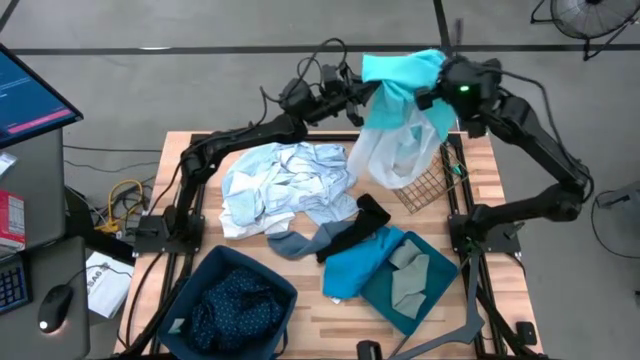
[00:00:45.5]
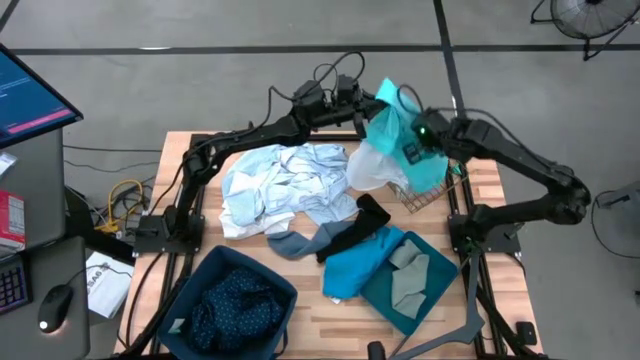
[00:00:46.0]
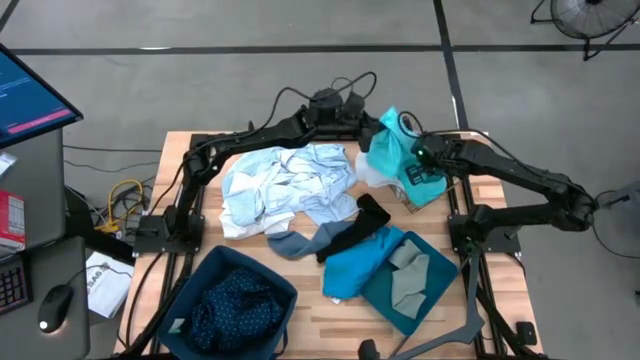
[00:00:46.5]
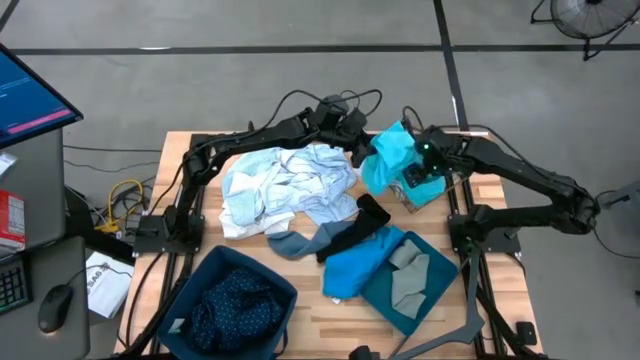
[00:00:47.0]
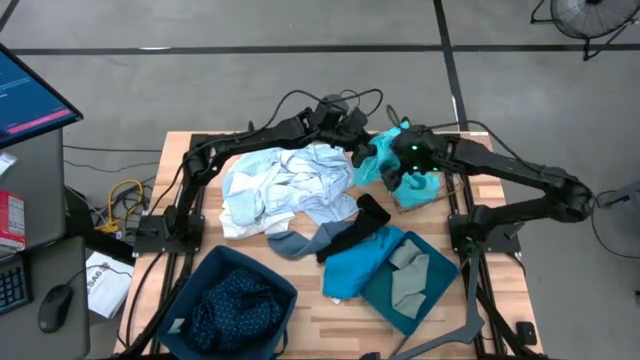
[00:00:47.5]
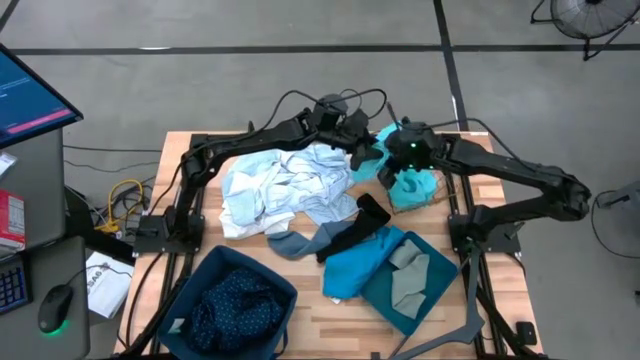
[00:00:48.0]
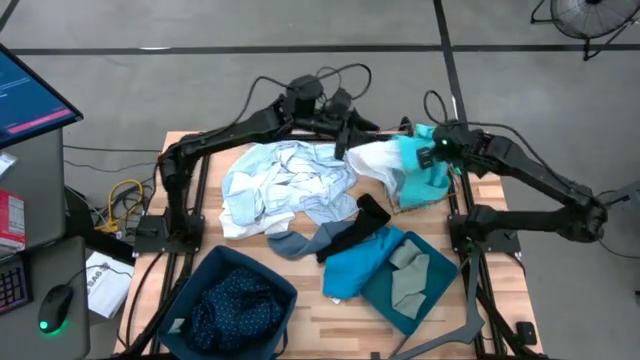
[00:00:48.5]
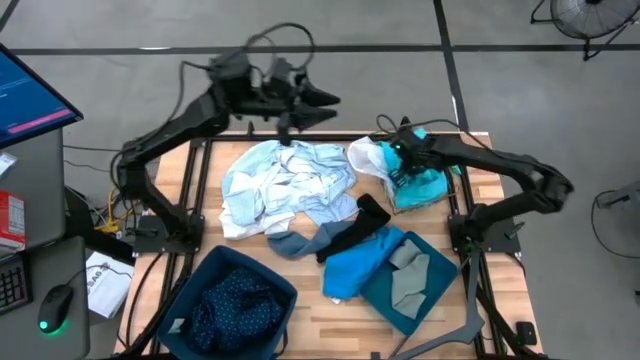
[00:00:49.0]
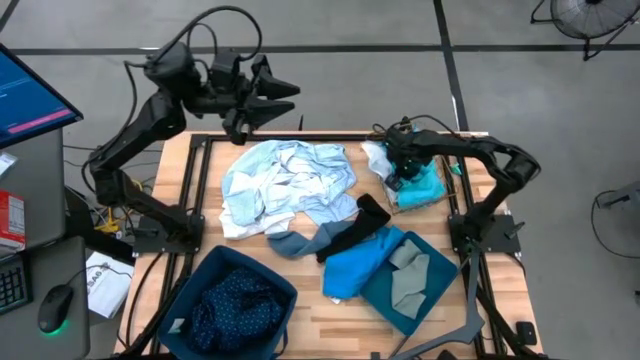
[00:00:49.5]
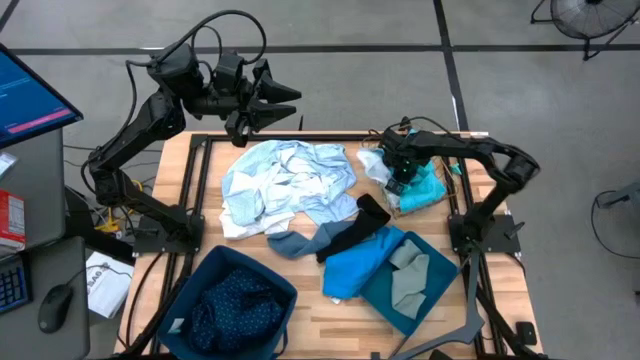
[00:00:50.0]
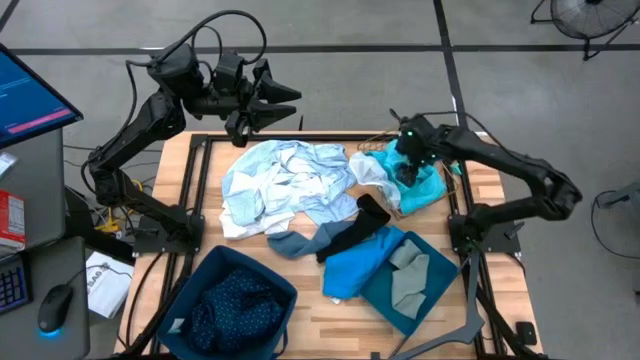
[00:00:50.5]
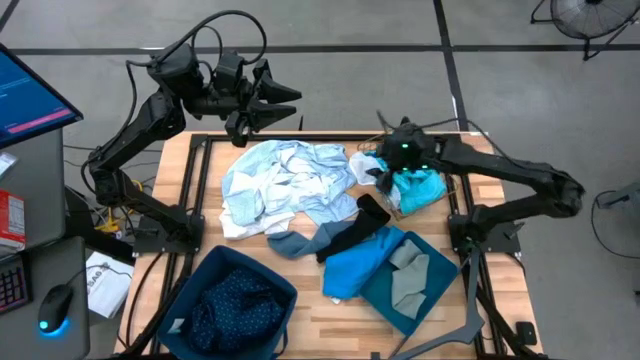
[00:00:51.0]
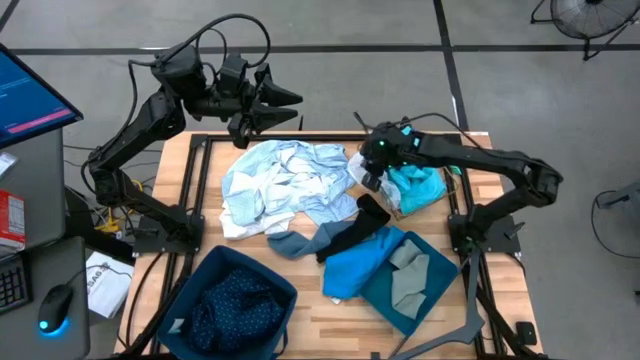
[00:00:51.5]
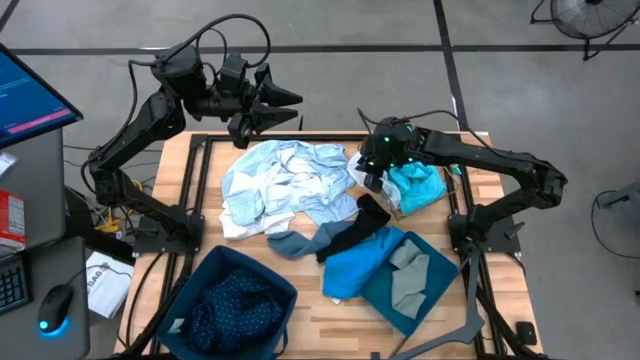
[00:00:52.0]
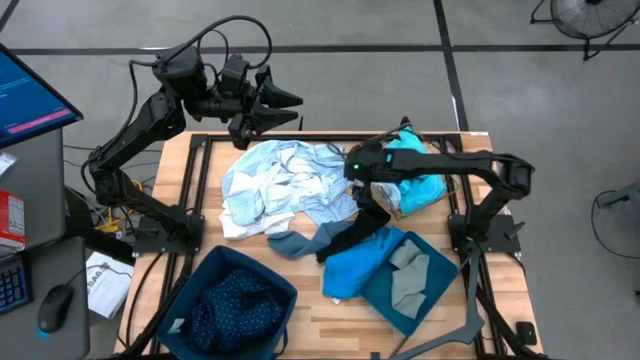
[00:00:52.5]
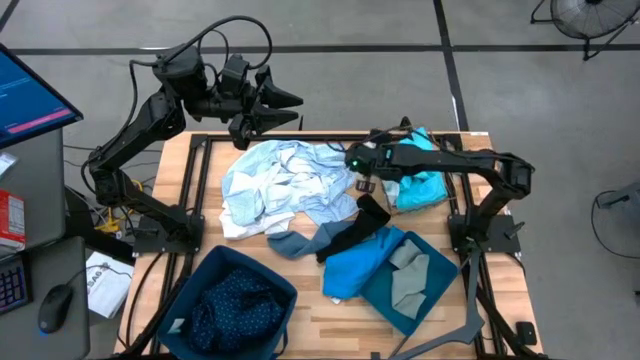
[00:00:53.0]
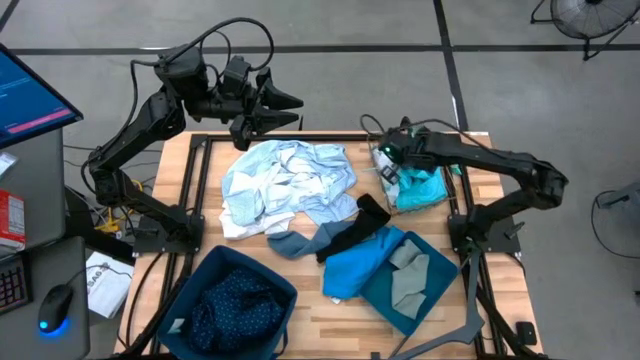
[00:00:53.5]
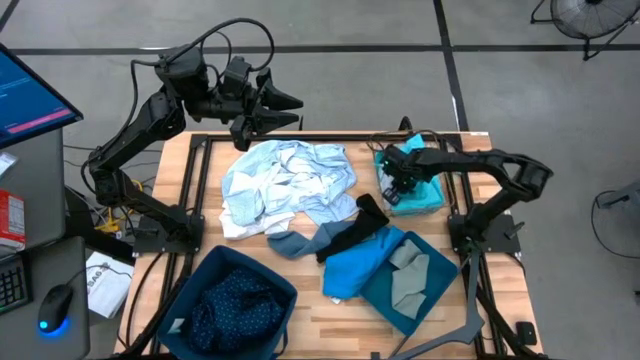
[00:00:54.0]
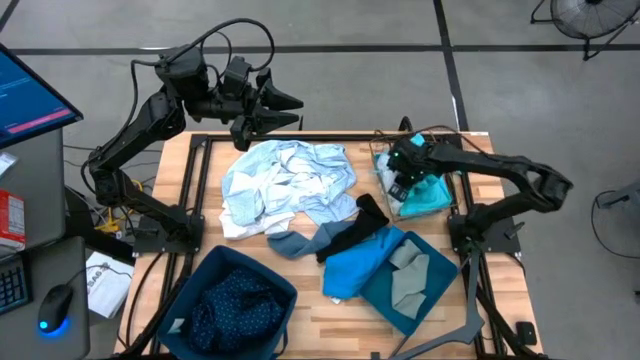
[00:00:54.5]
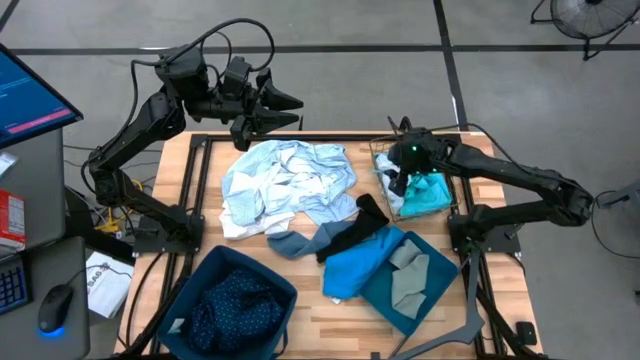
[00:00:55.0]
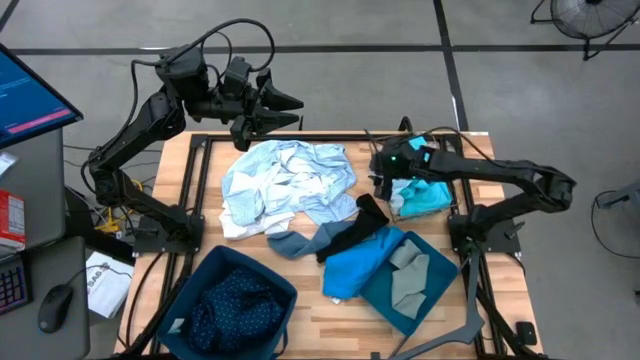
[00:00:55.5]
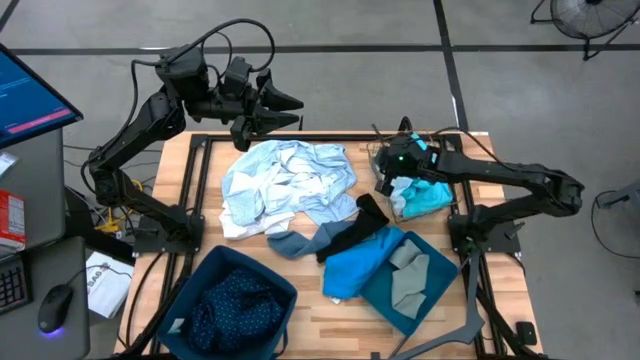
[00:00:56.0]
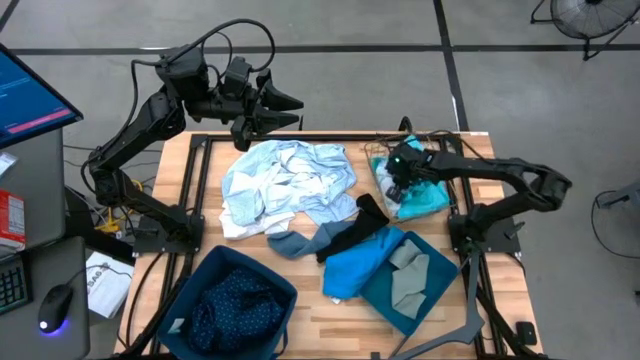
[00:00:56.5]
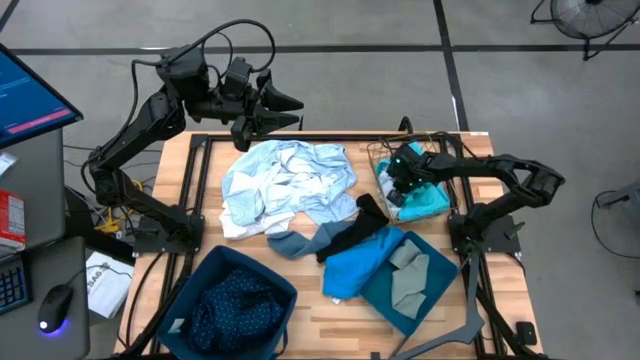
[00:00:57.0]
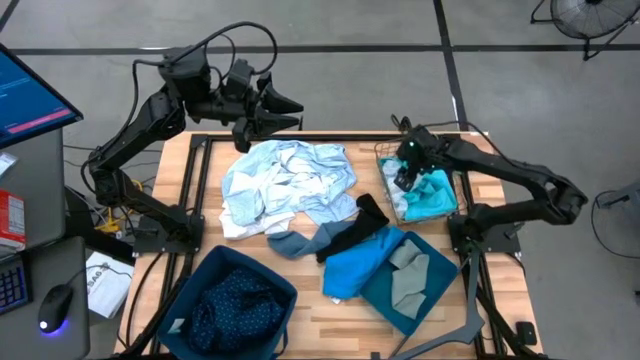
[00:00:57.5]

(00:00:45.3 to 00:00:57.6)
Task: Pick & Place Cloths
Put the light shorts into the wire basket

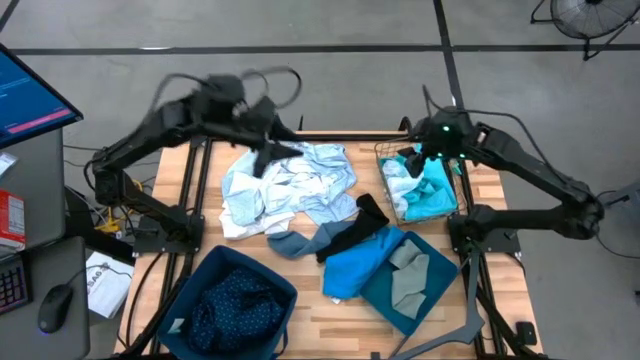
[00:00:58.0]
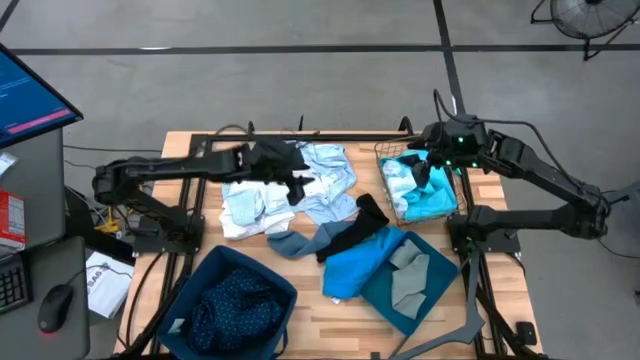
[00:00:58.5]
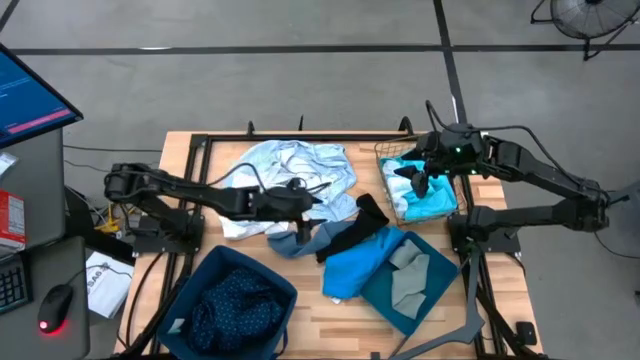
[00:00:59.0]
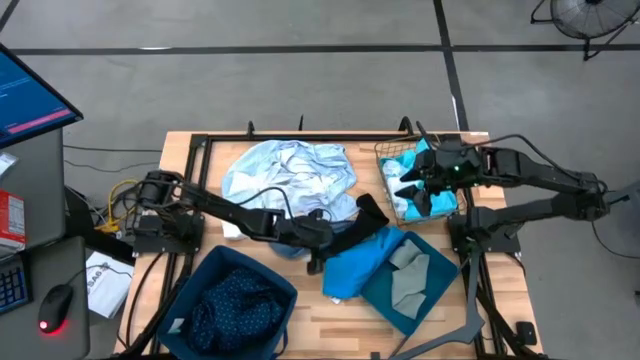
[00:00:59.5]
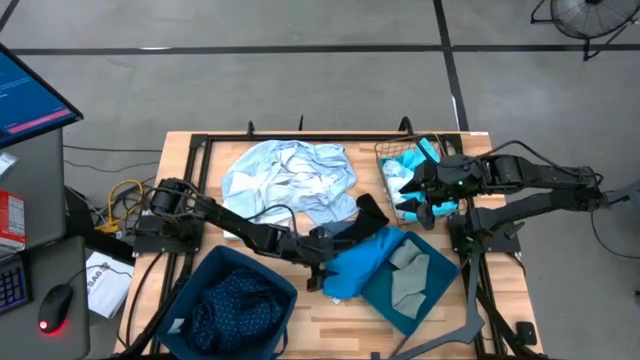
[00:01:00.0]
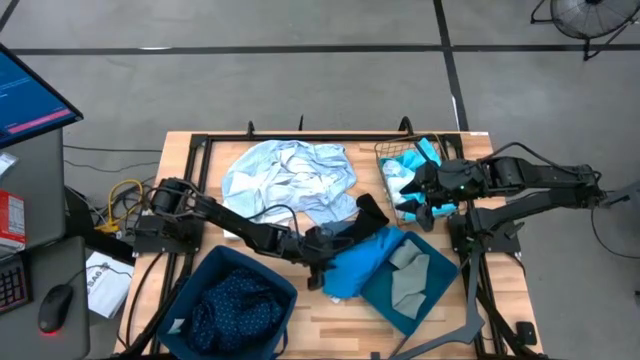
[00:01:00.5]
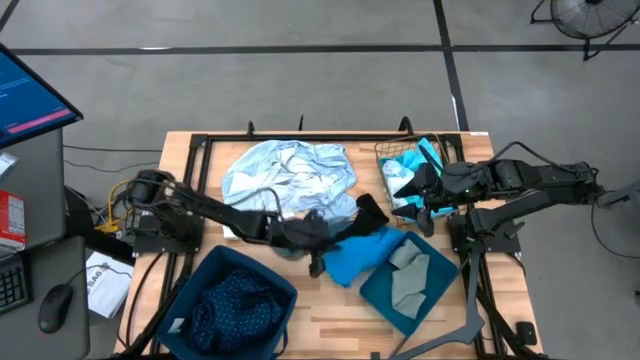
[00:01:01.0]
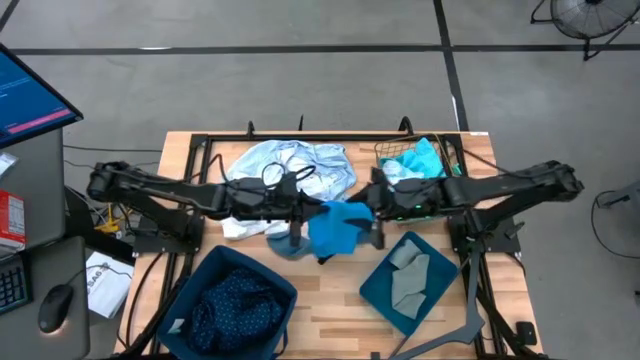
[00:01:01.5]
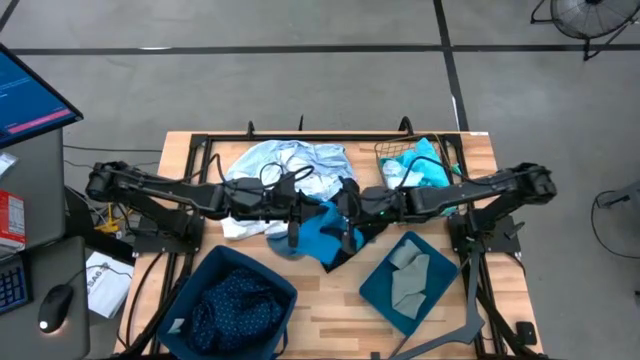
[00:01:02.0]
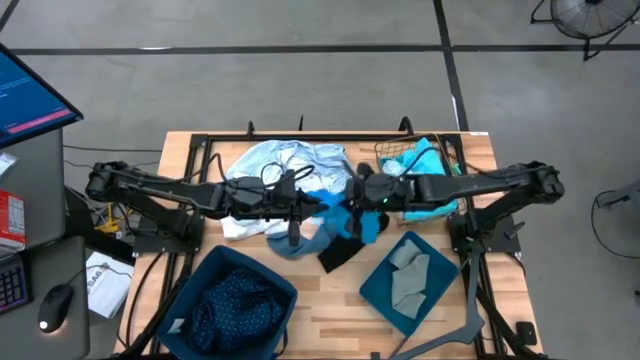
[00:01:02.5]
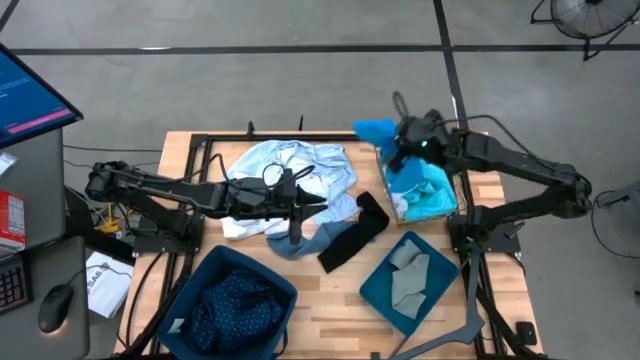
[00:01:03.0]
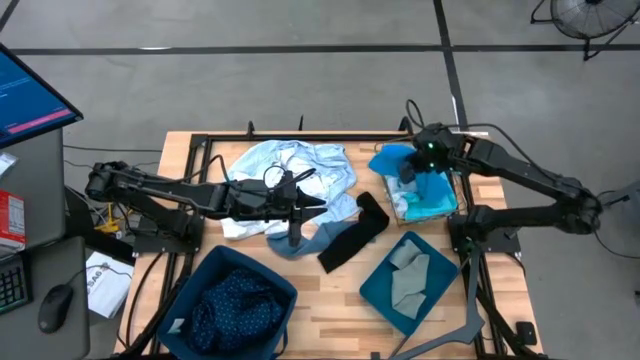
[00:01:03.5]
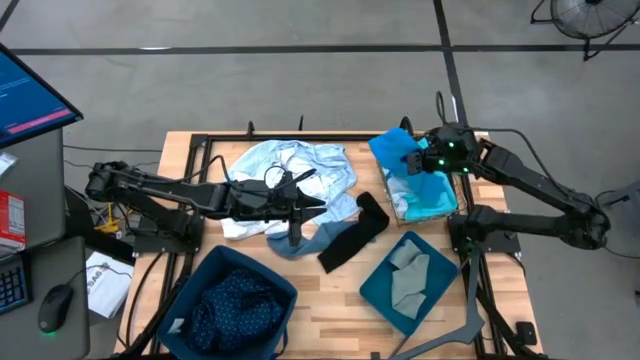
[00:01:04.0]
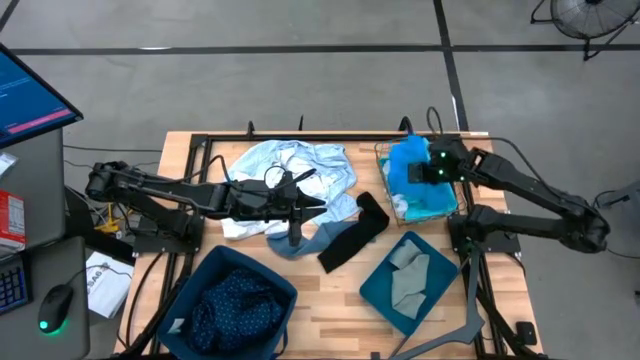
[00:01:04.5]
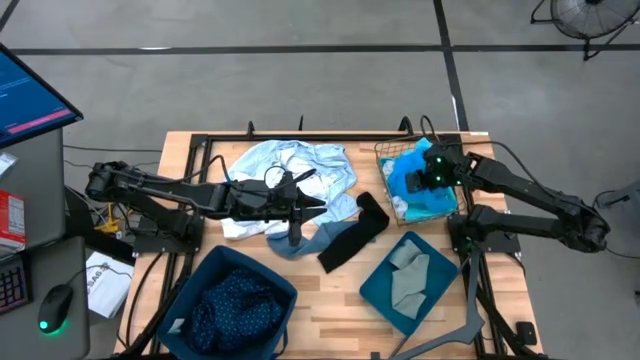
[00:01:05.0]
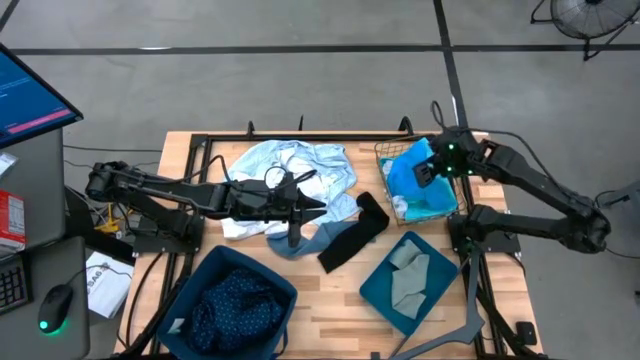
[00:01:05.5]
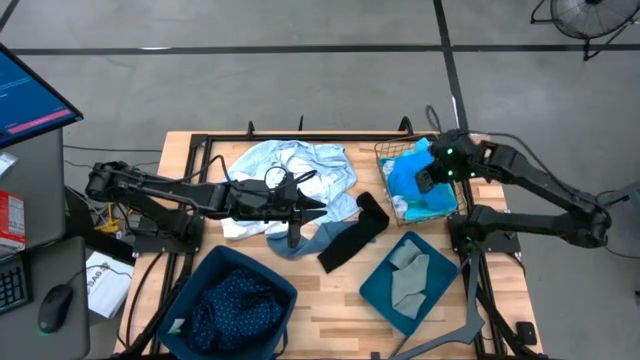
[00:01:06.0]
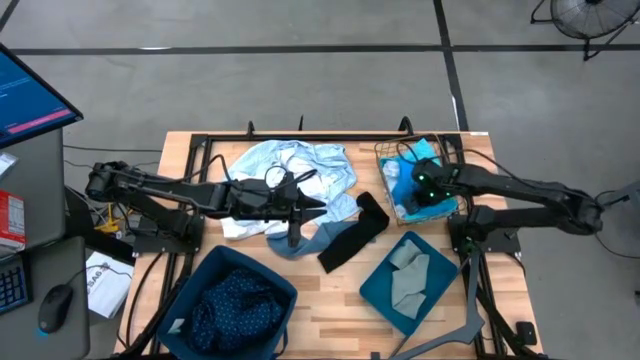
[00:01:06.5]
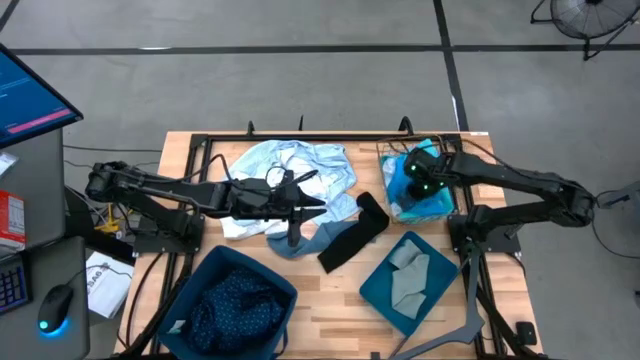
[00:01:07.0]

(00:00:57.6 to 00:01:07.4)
Put the blue shorts into the wire basket
